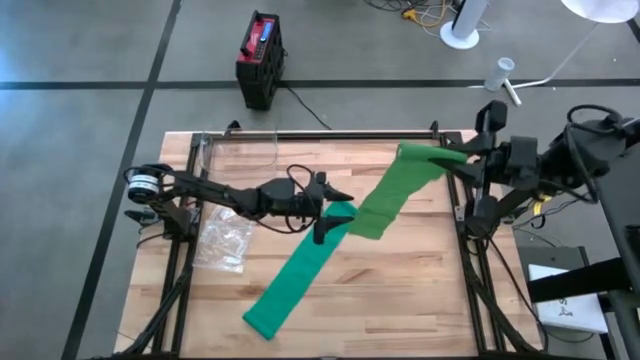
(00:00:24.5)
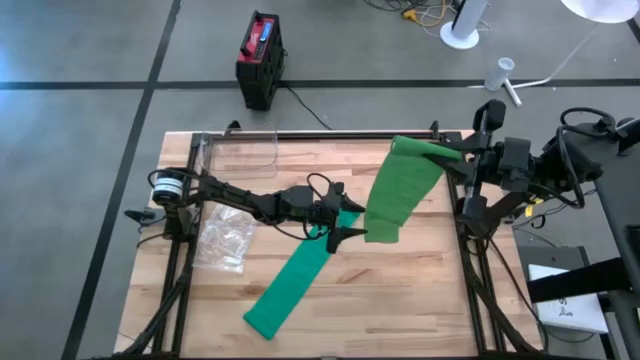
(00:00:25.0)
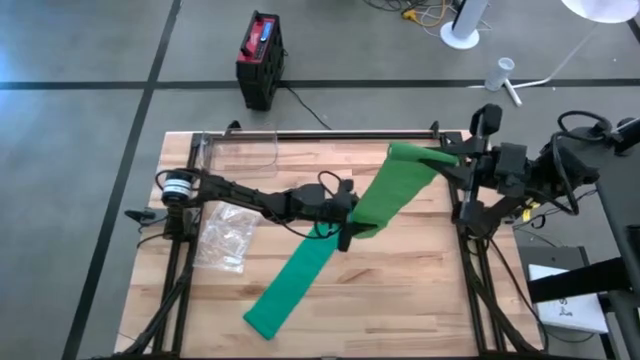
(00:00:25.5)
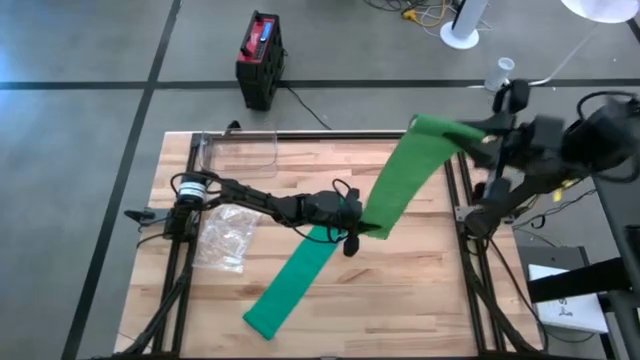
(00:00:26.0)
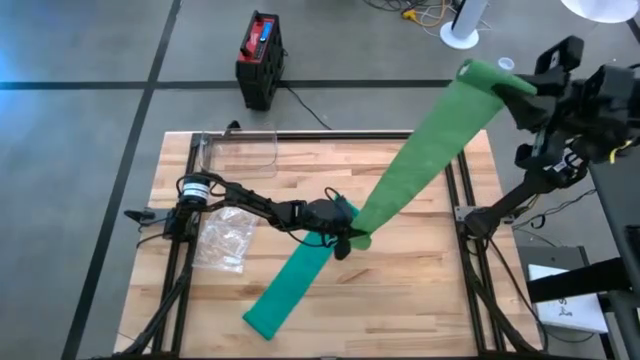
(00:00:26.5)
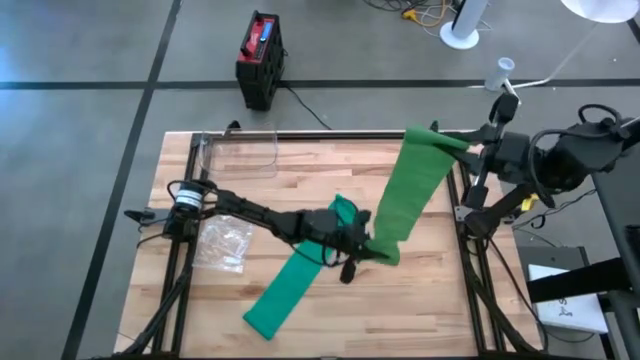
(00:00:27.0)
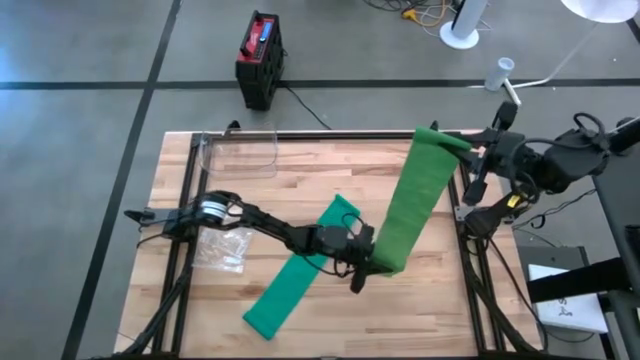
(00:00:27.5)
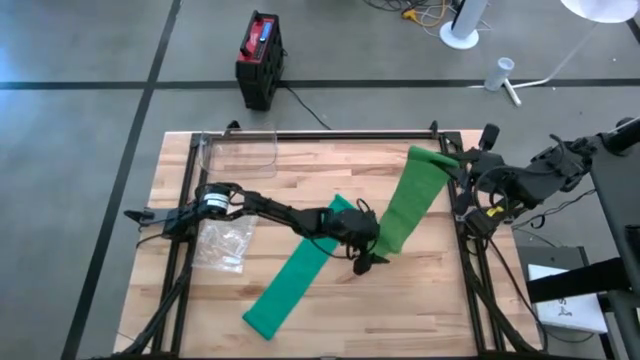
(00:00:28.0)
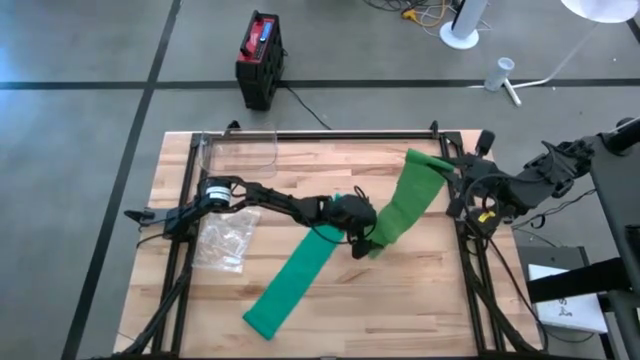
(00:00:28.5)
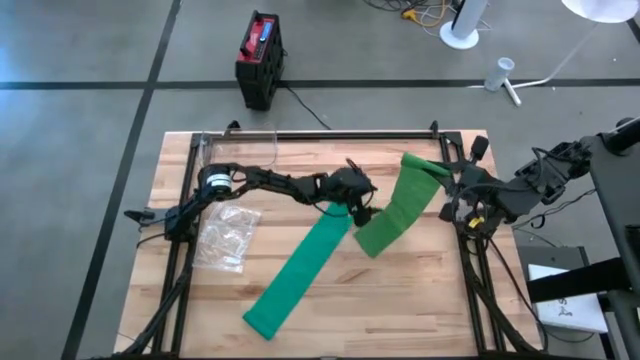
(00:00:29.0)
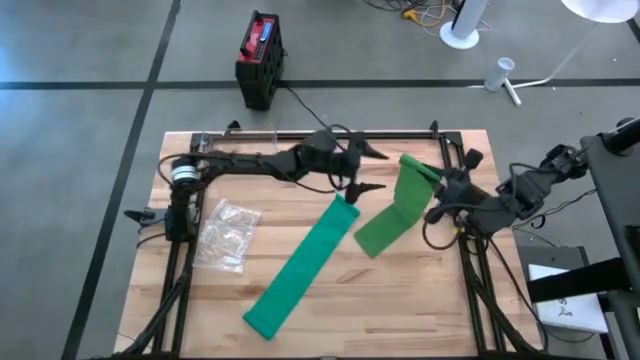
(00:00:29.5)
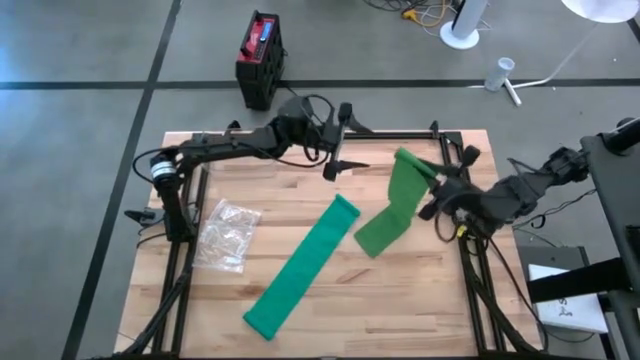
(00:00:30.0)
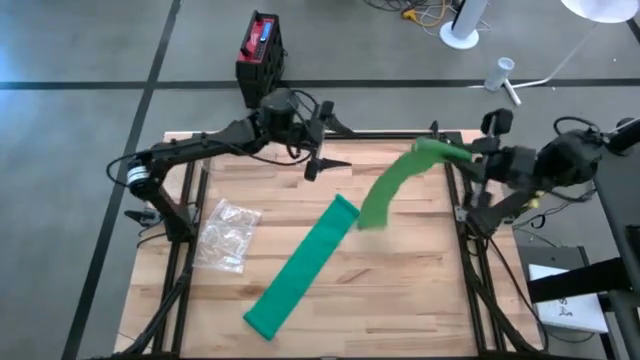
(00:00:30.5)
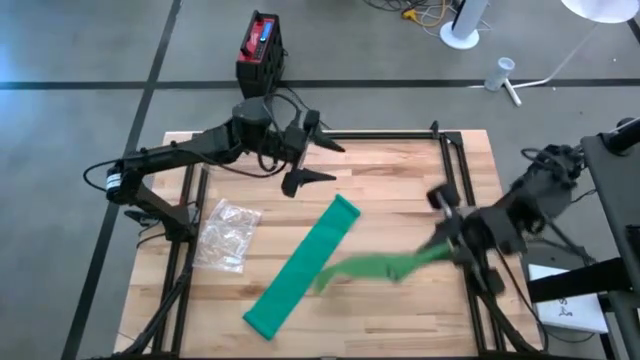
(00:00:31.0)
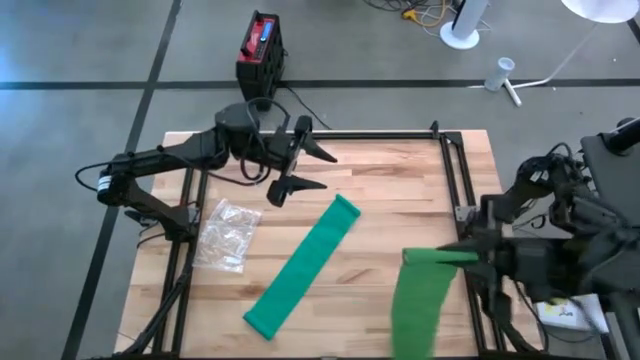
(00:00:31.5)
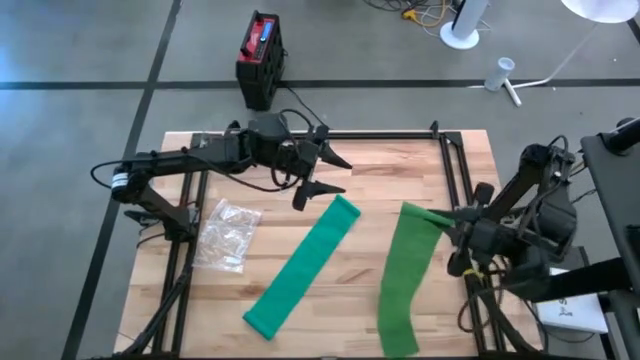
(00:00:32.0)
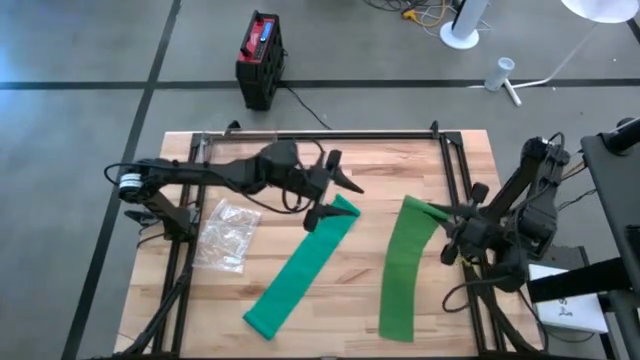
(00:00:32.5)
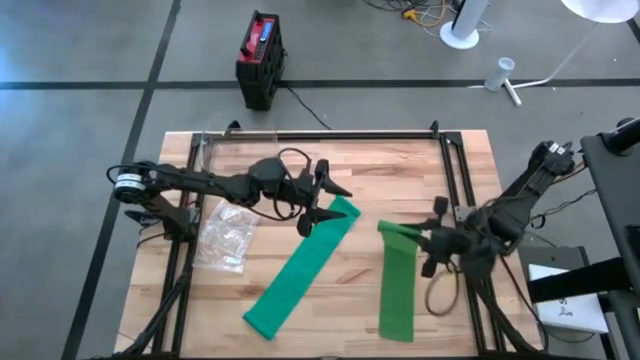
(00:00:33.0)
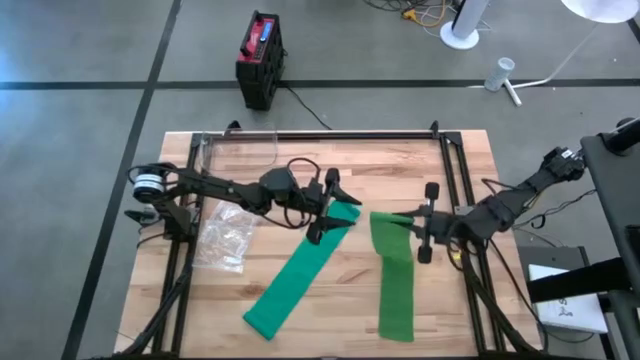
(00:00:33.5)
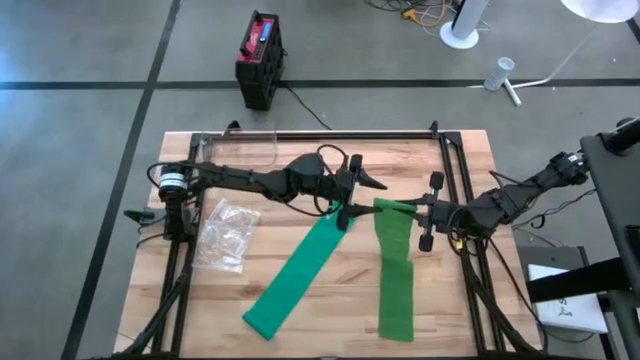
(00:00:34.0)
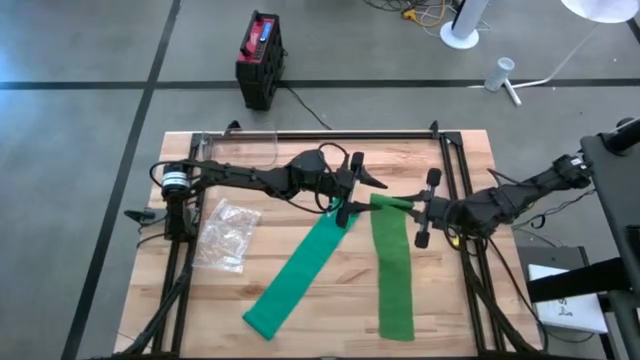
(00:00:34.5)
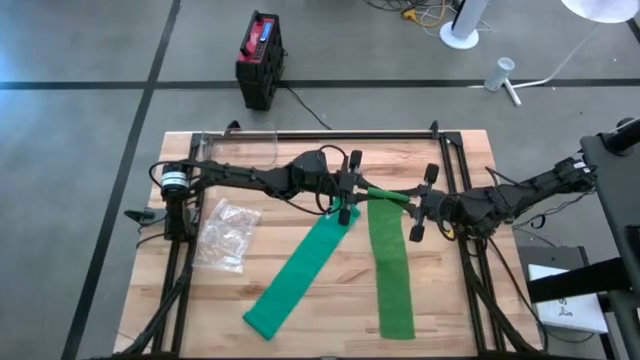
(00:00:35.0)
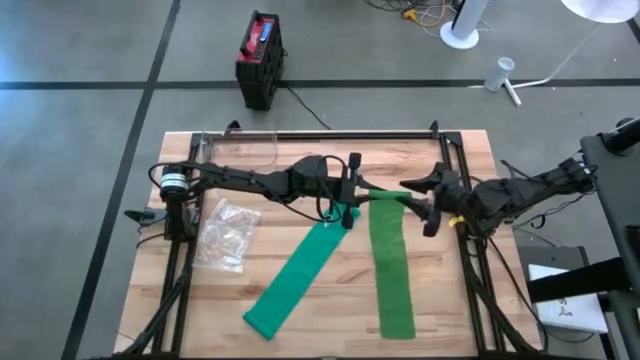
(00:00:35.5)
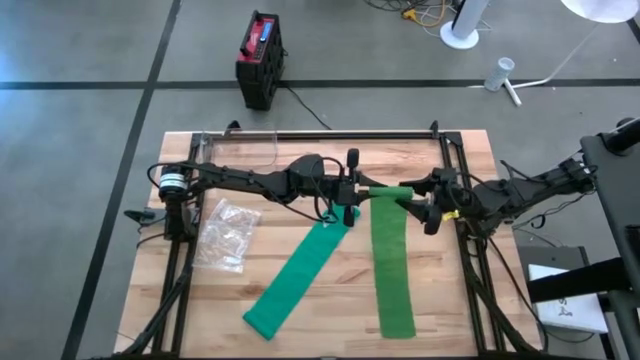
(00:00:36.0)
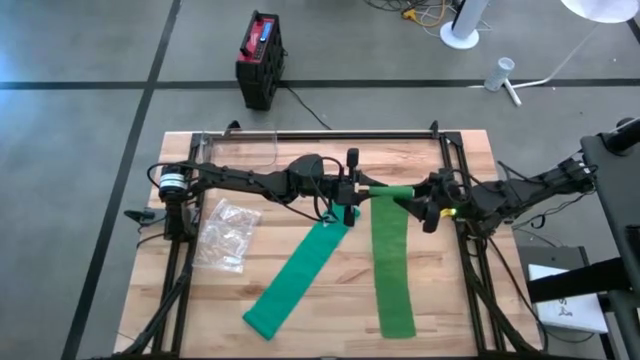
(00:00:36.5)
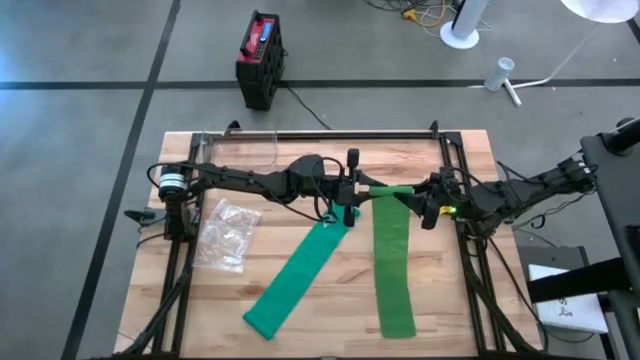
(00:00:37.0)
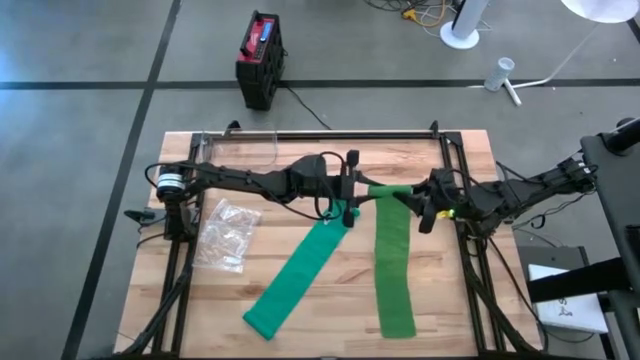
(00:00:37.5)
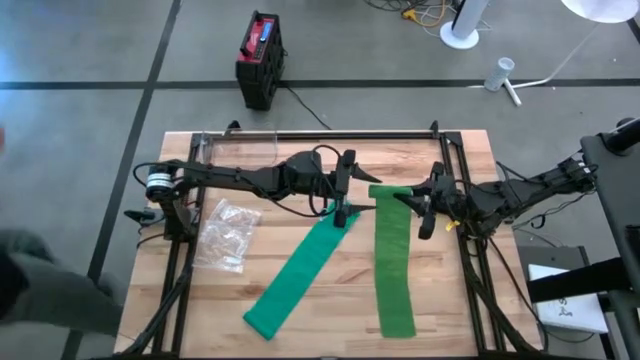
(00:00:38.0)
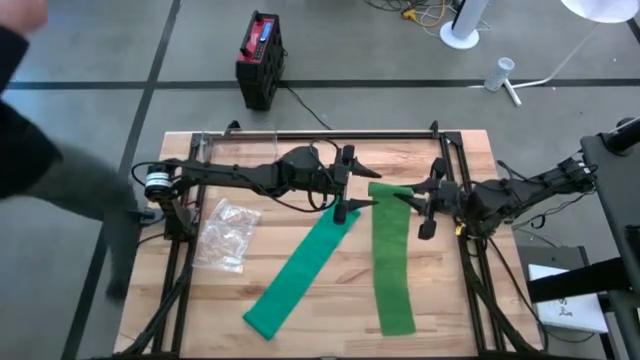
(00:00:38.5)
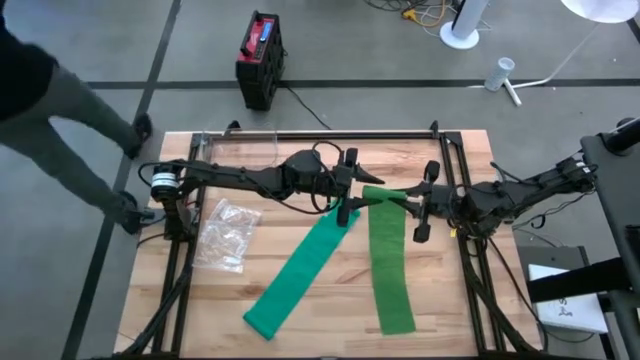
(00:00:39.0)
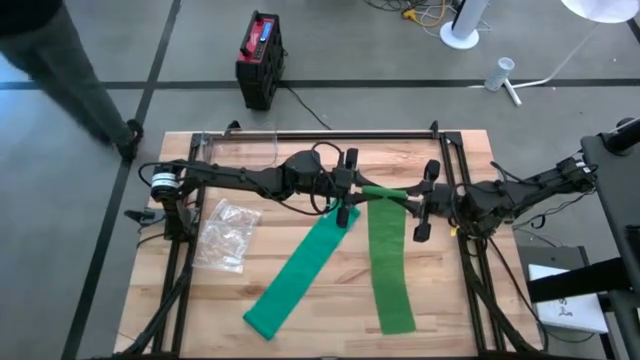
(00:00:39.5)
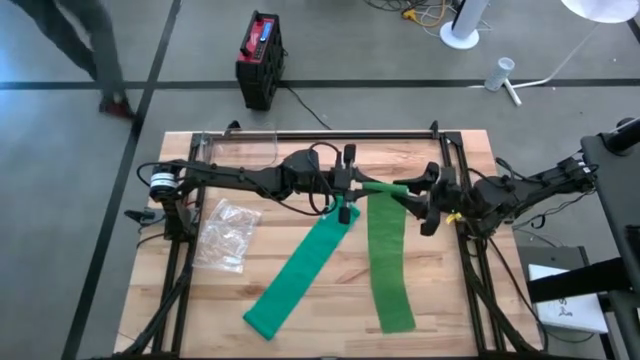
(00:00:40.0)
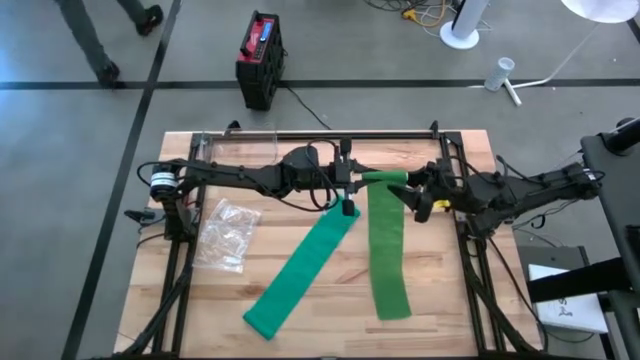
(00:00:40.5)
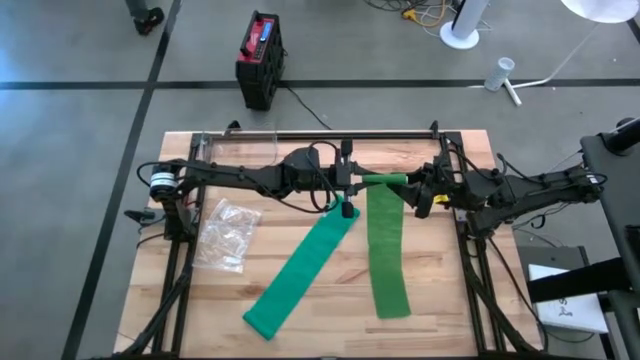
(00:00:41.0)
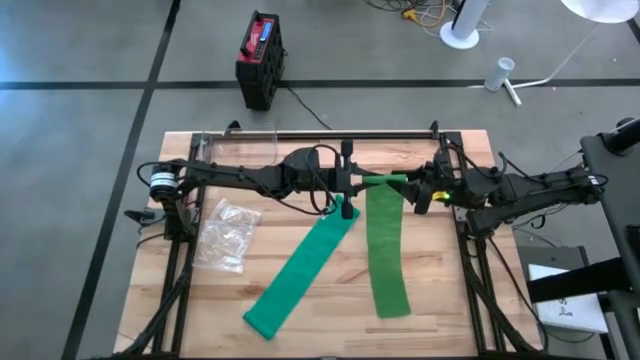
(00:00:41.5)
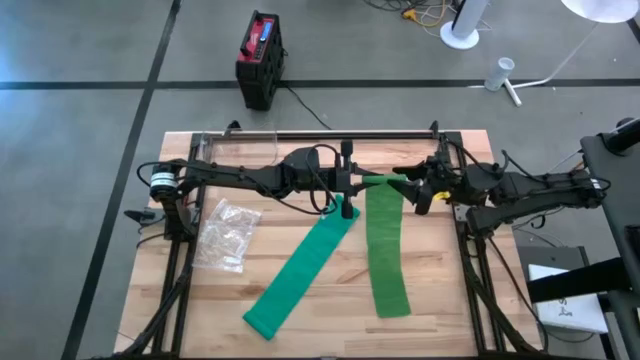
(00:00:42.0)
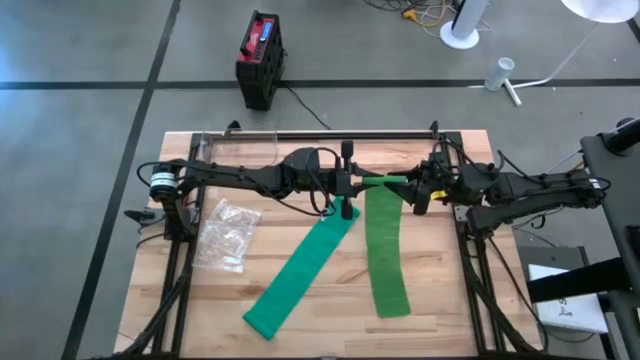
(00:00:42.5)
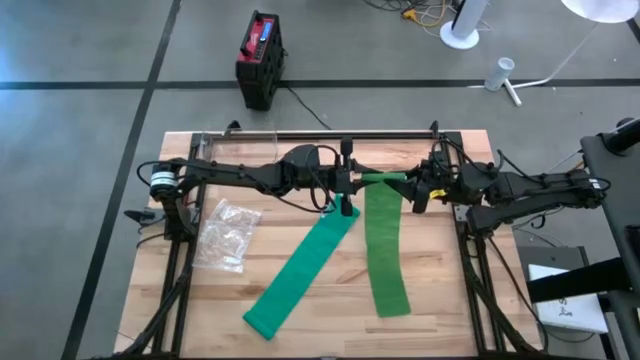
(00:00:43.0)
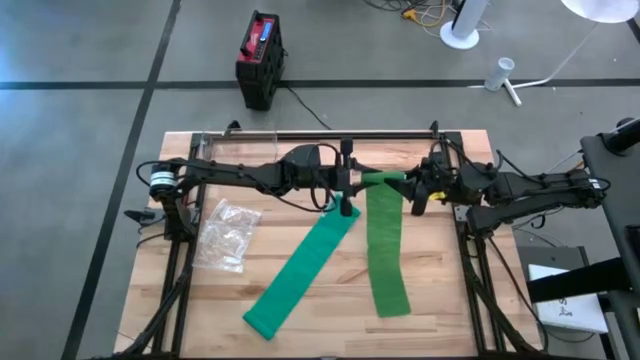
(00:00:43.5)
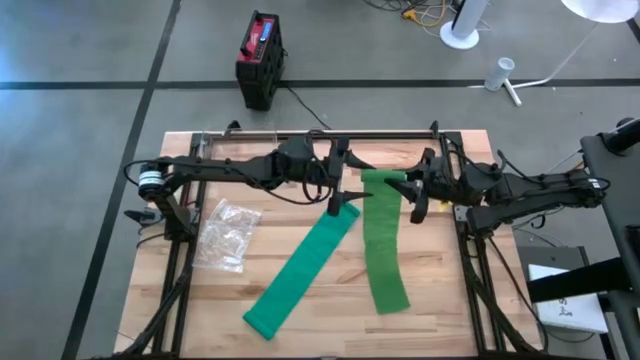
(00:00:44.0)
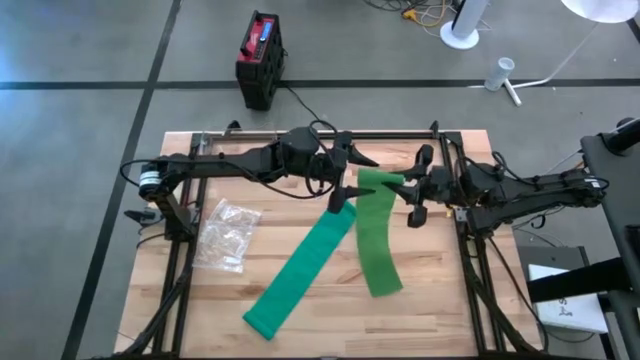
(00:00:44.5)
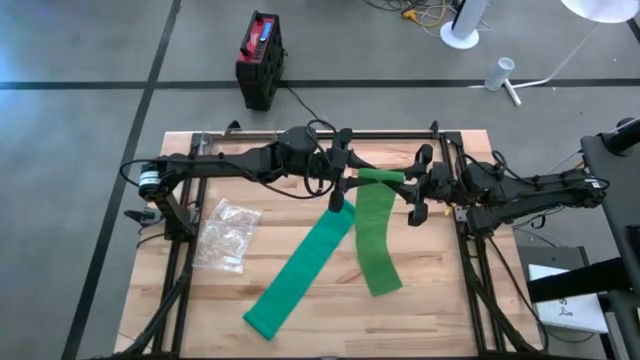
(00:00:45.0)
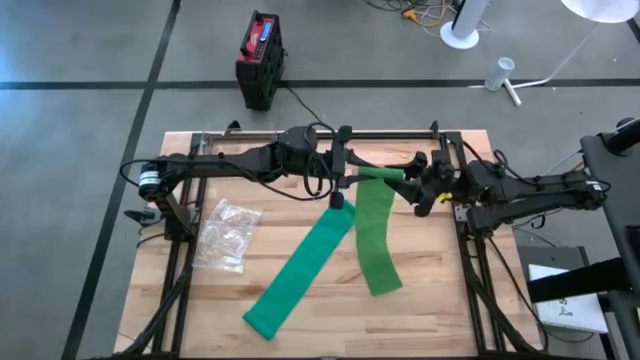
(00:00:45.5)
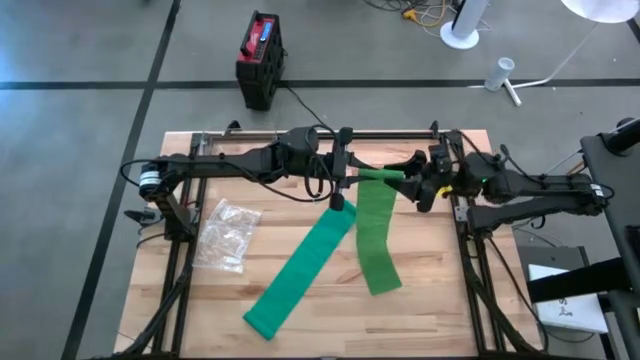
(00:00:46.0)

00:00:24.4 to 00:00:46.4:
Task: Roll bandage
Roll the green bandage
